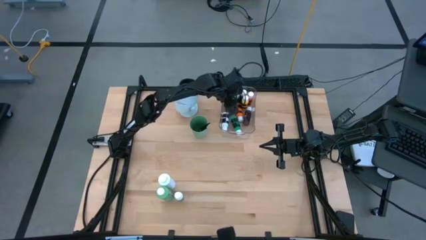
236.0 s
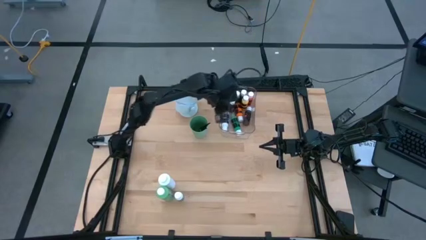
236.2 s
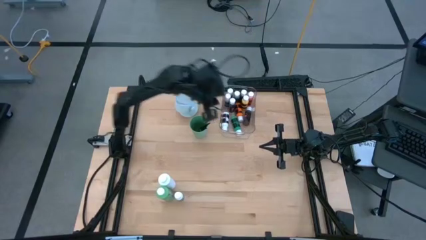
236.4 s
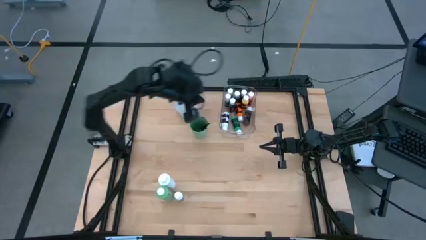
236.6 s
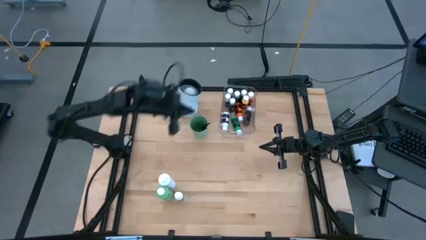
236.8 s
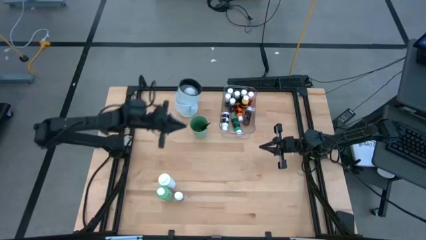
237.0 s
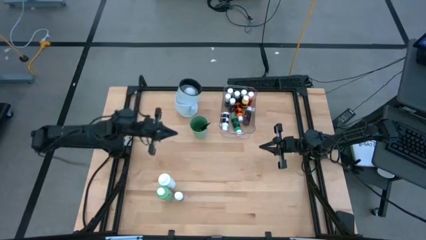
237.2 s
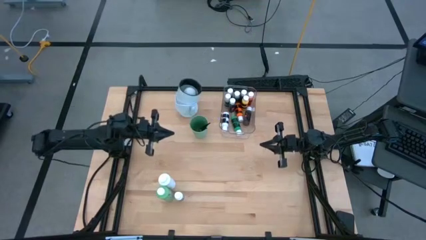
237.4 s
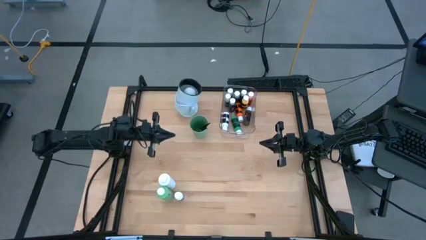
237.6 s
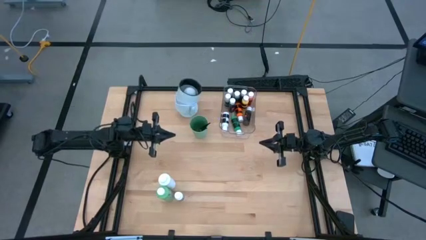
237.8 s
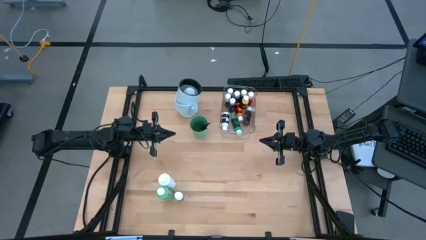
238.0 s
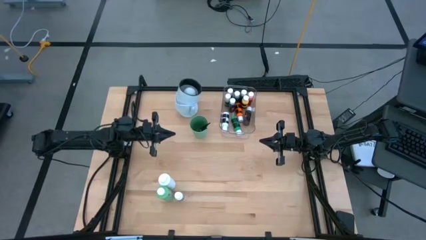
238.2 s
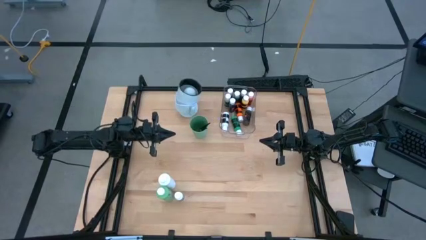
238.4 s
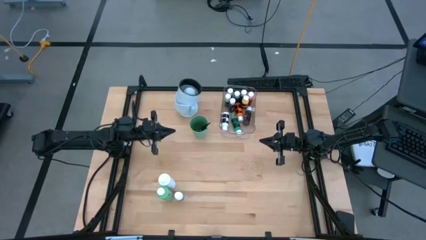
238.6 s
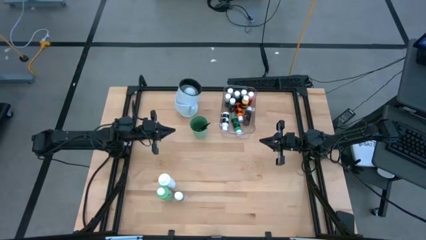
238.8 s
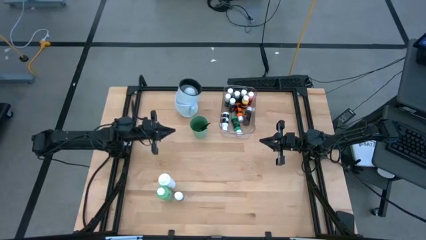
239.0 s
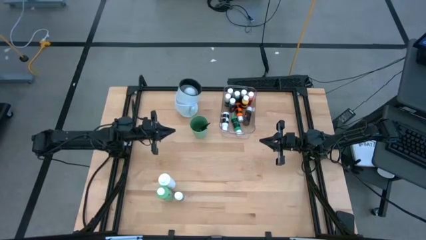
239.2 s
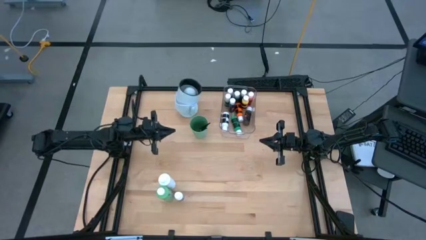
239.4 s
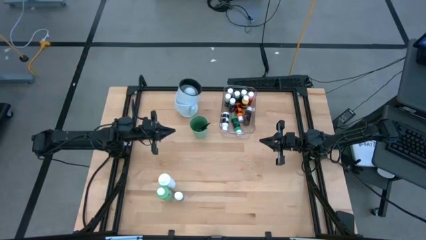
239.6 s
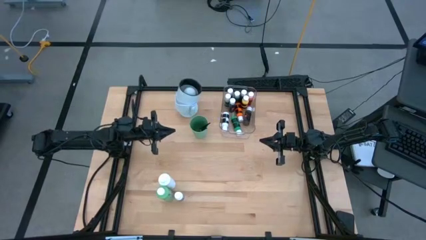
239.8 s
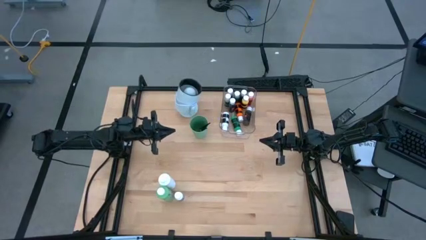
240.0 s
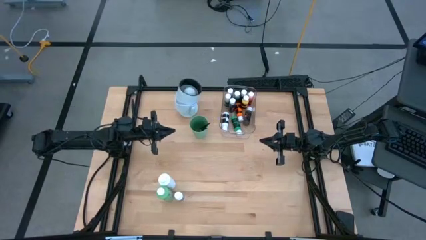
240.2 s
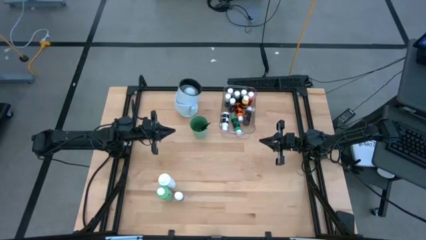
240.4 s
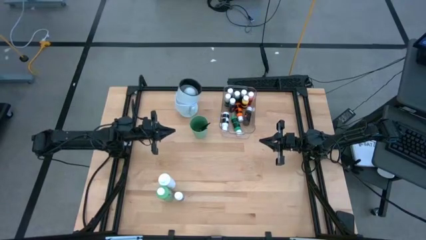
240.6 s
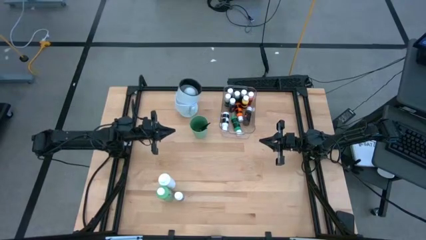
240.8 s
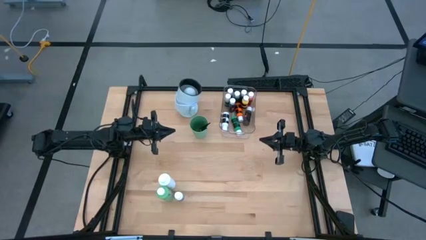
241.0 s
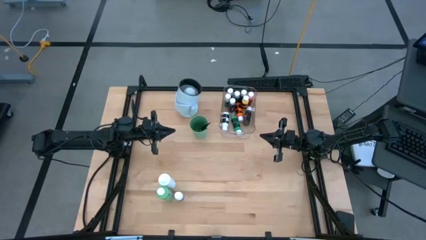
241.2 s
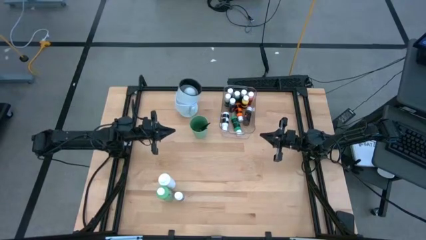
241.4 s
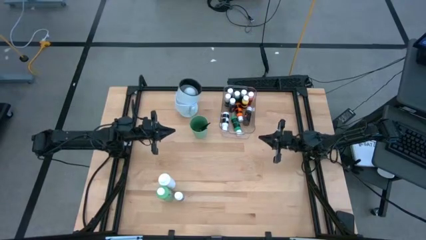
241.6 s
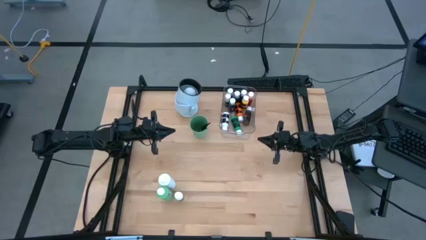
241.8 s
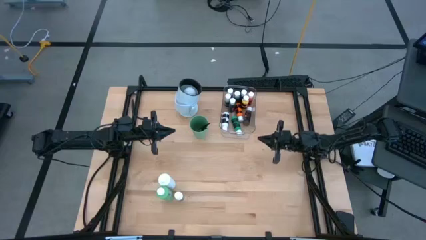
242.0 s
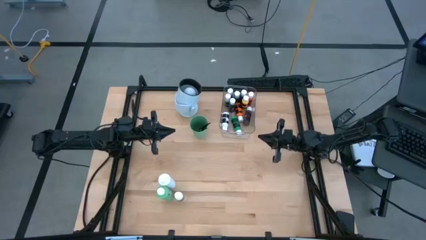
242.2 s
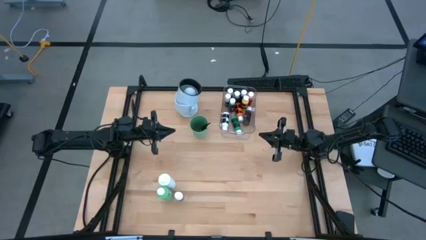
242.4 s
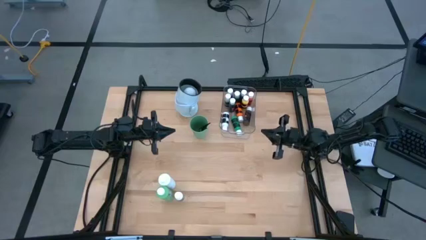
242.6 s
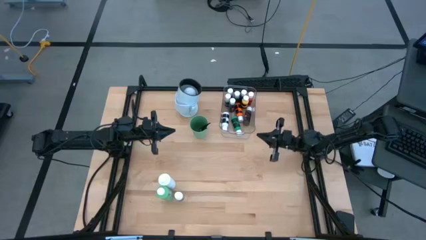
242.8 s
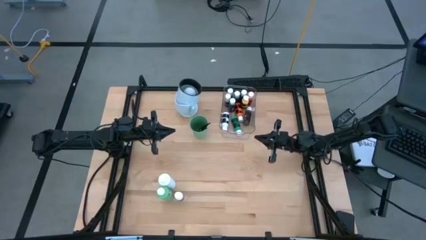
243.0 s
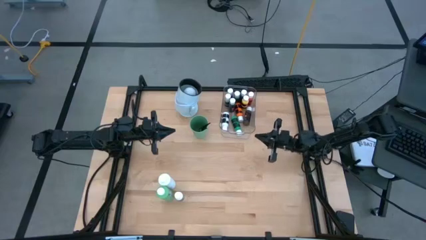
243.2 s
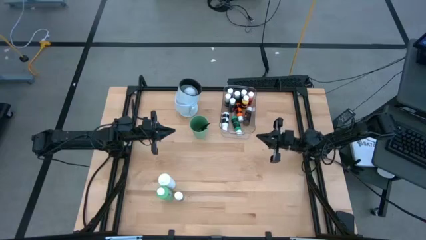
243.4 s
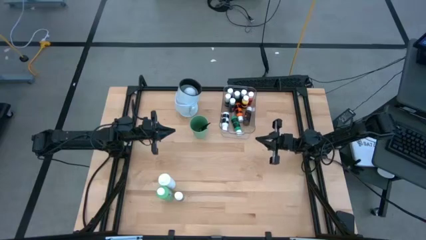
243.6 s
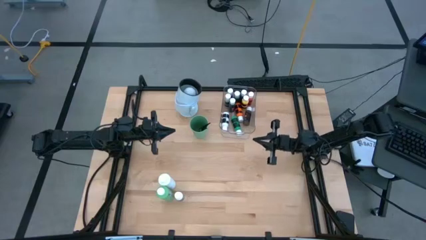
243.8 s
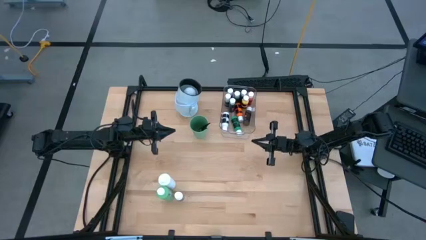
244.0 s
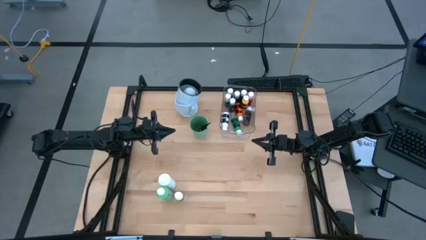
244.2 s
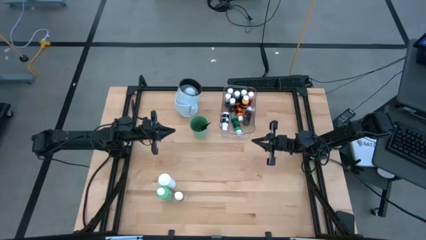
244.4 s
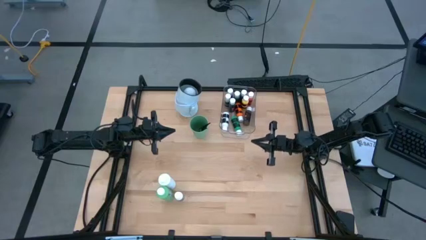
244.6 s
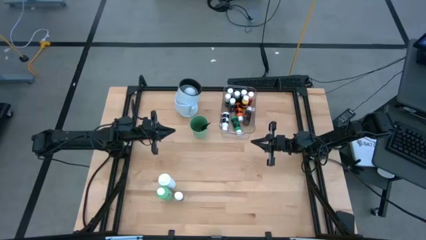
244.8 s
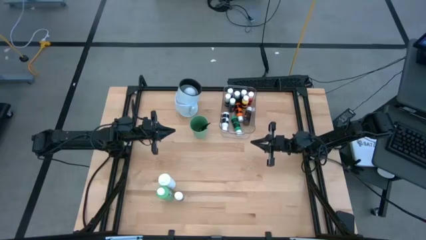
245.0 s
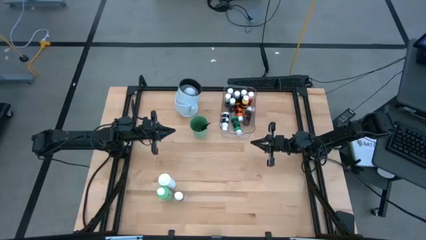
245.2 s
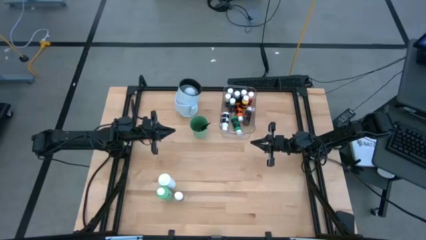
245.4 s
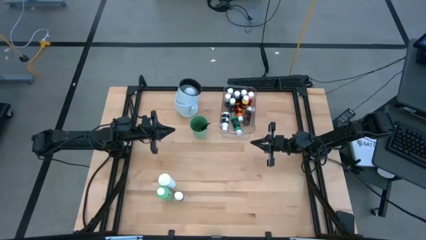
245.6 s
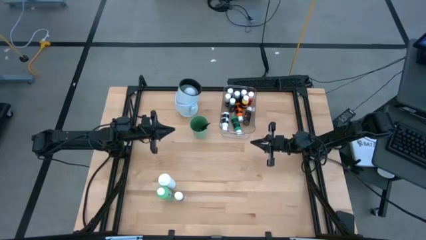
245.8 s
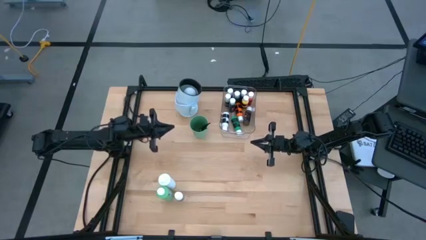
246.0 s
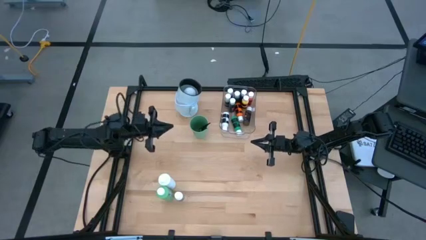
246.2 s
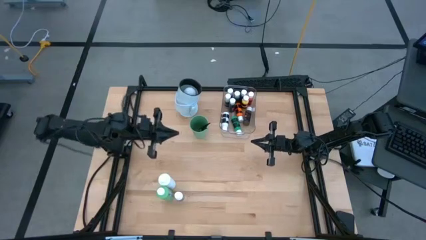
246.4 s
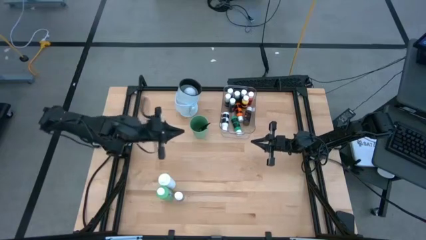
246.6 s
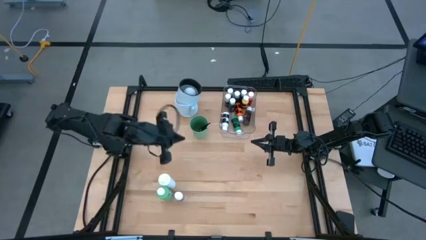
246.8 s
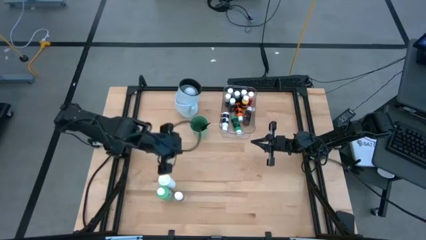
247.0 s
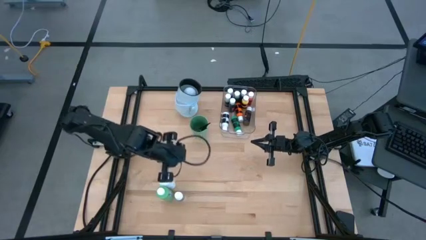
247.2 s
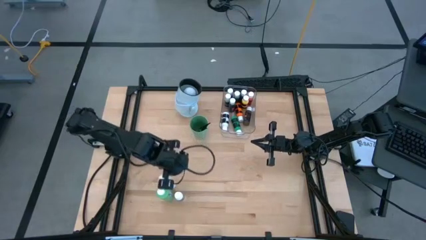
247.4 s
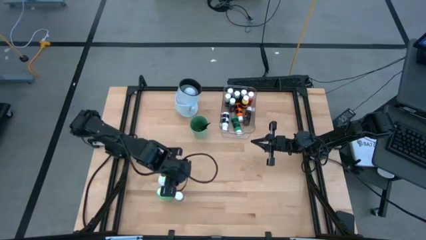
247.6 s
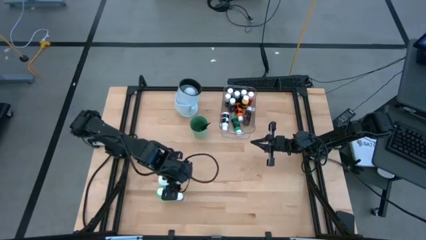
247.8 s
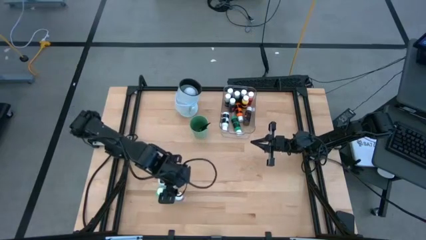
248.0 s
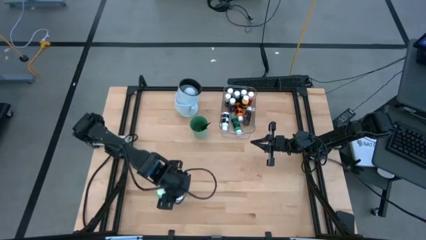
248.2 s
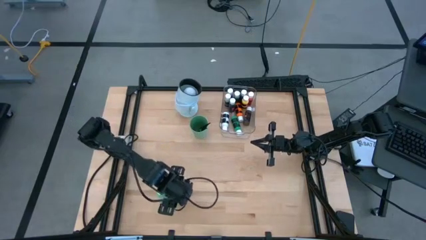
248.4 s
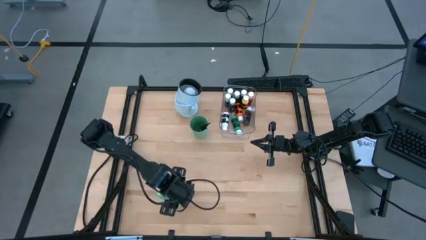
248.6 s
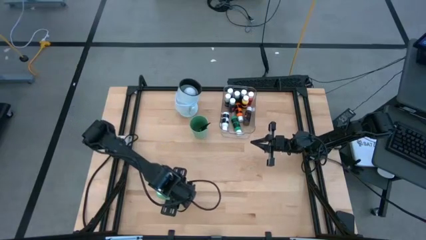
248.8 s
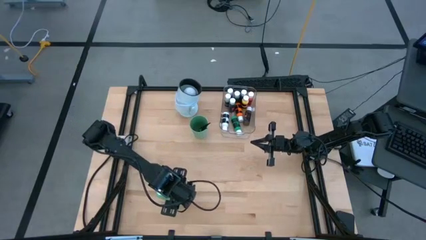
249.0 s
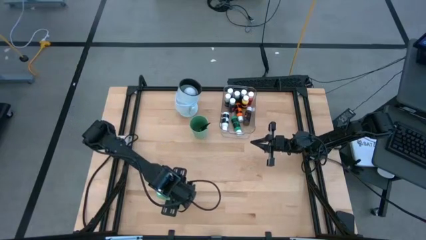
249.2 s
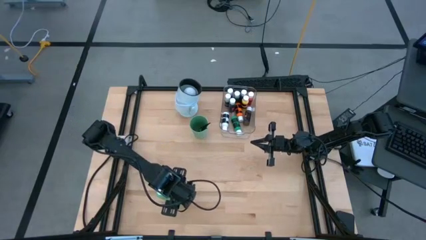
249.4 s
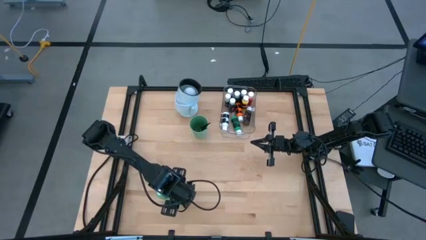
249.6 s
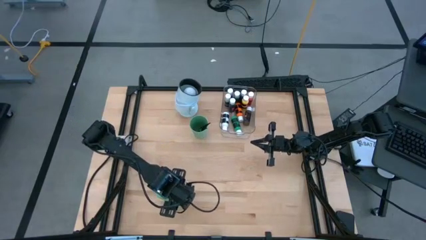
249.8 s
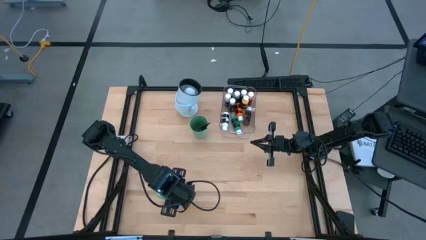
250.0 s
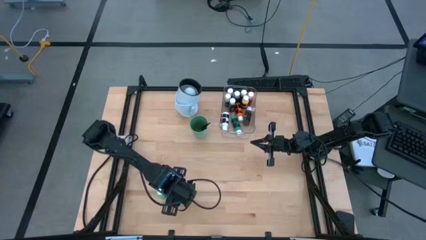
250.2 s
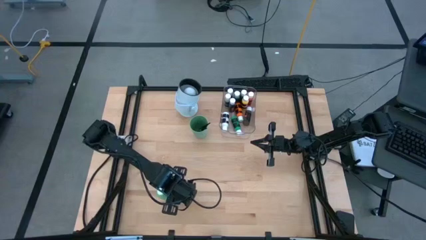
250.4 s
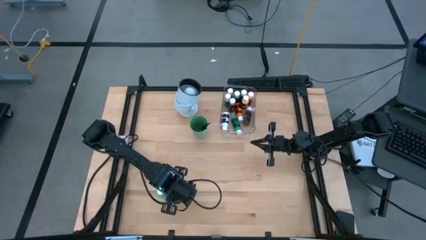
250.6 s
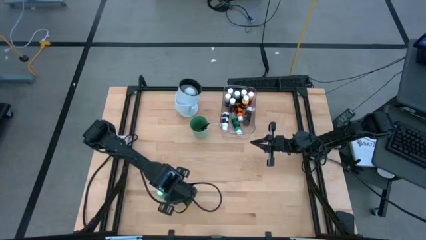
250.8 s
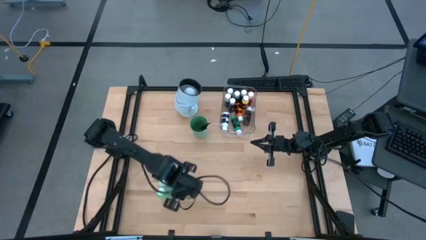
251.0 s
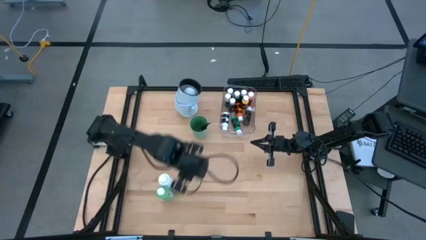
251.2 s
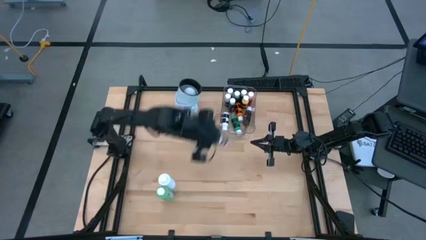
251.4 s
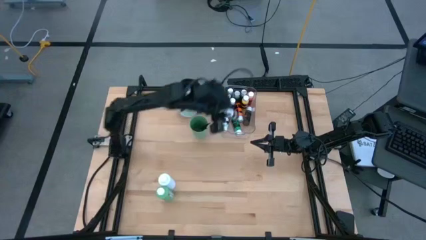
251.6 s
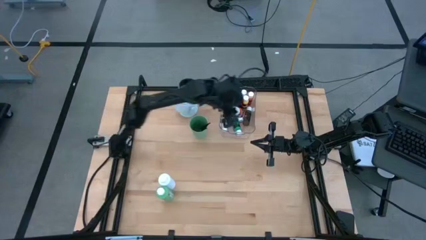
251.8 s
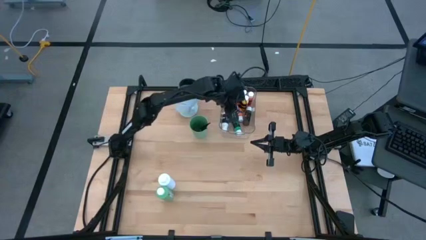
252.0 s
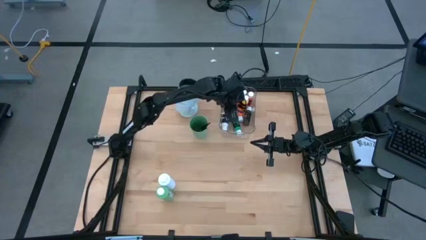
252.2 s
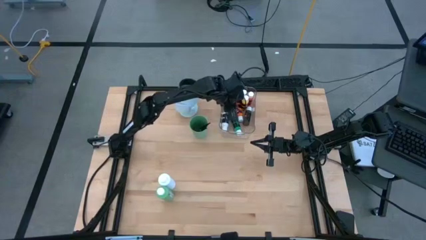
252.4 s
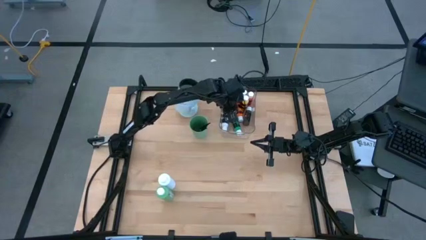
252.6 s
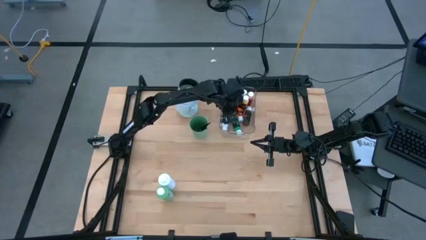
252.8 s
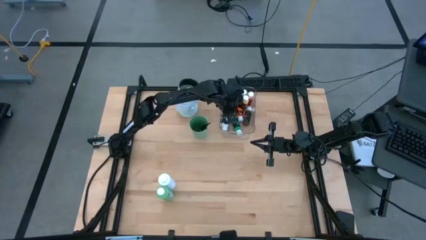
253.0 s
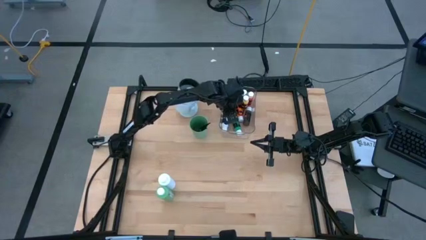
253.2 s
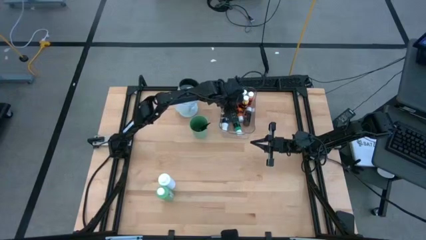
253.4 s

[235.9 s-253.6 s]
Task: Pick & Place Paint Supplies
Put the white paint bottle into the transparent bin
